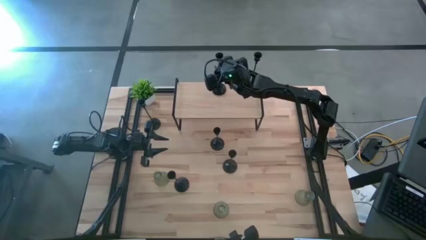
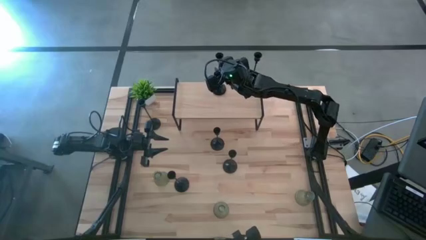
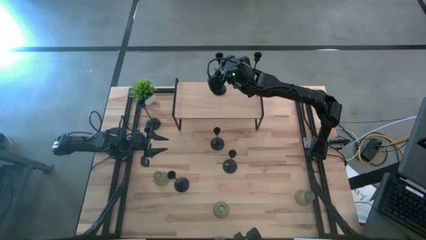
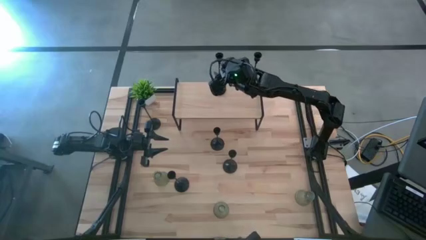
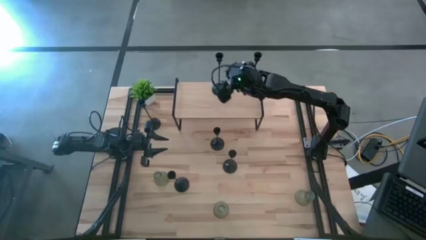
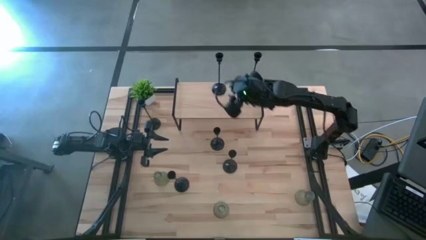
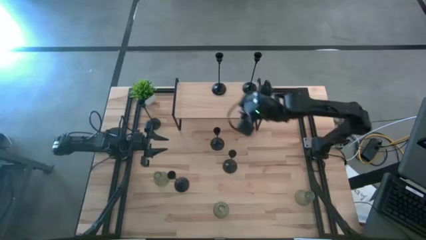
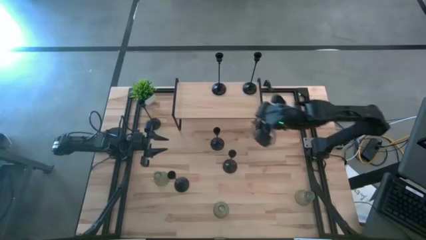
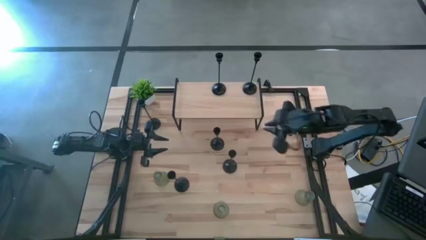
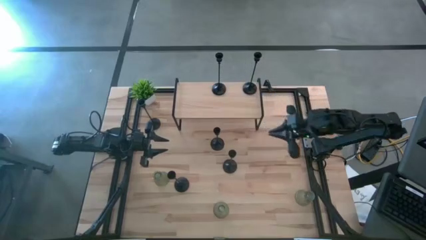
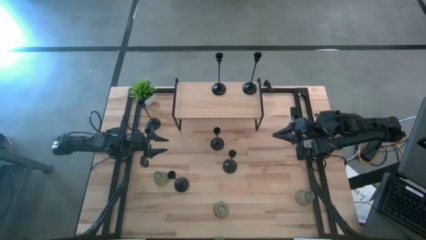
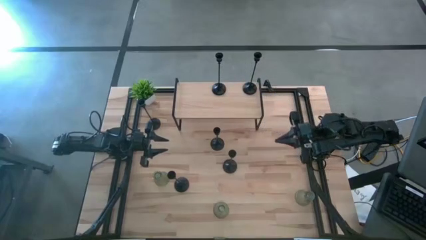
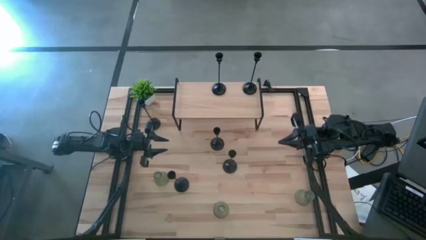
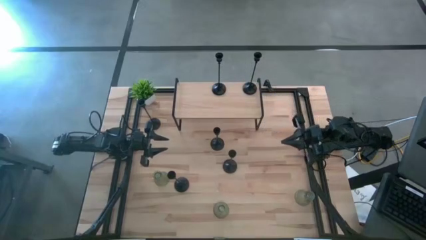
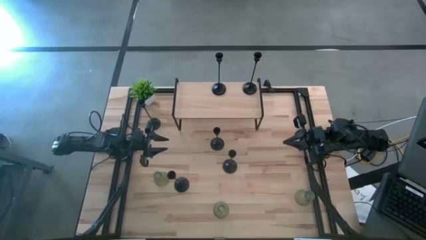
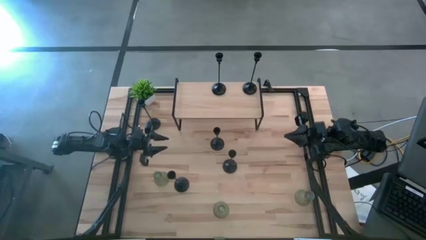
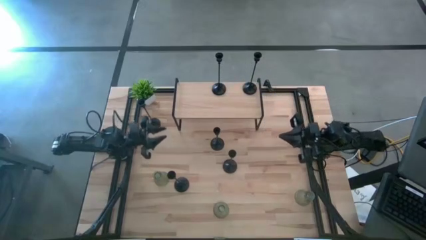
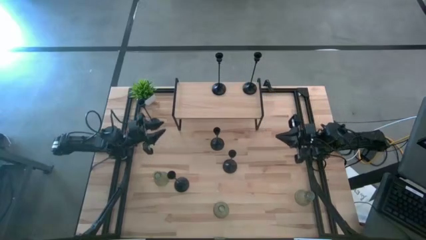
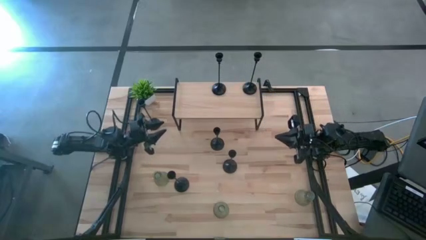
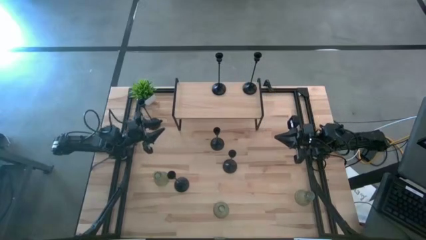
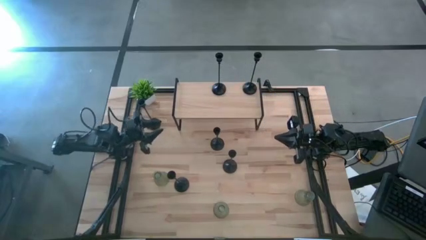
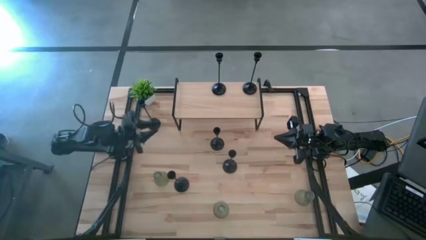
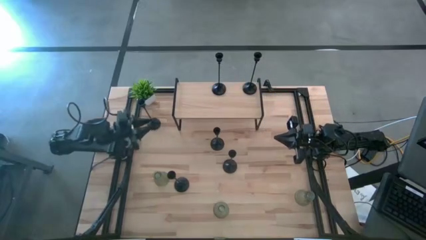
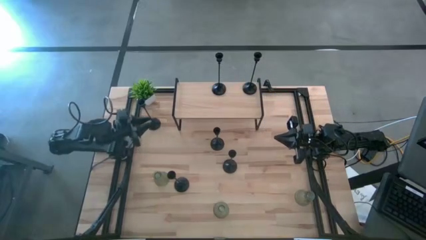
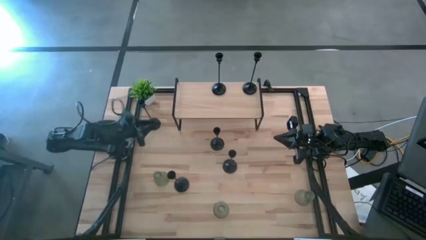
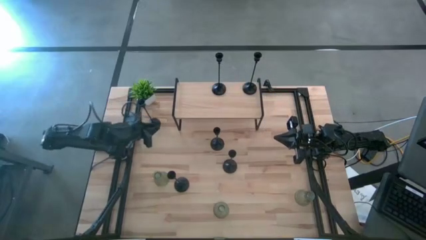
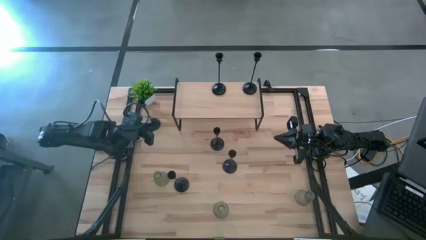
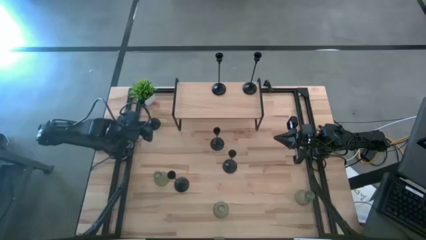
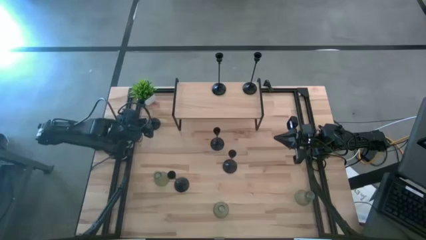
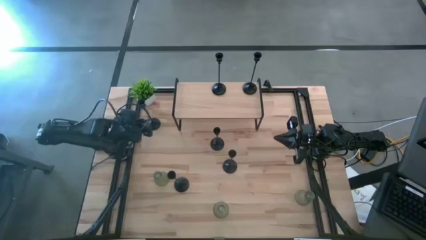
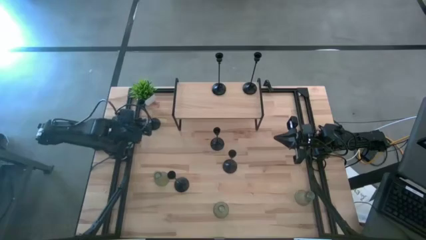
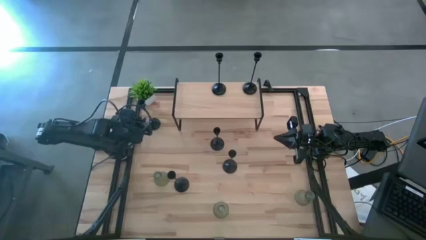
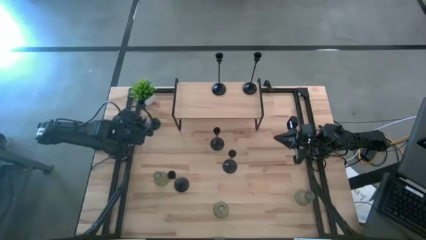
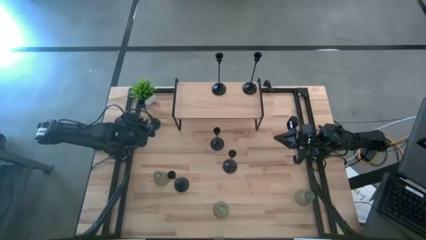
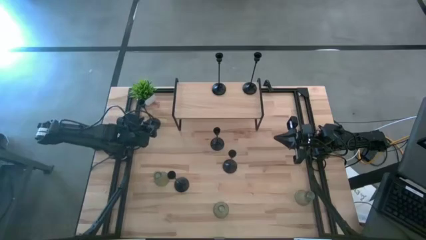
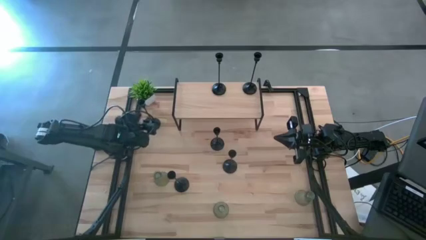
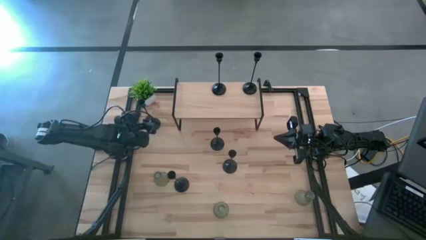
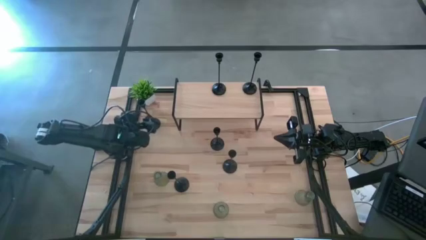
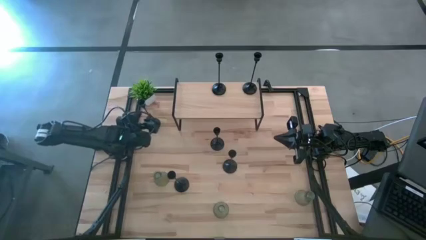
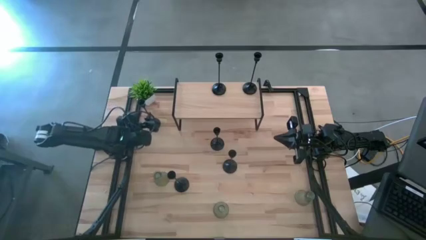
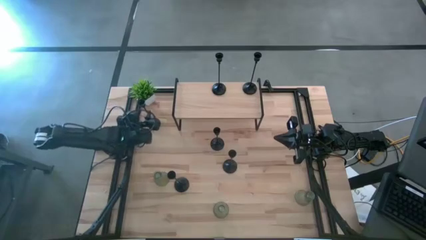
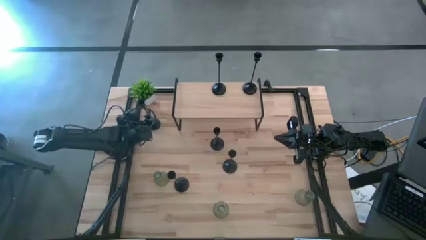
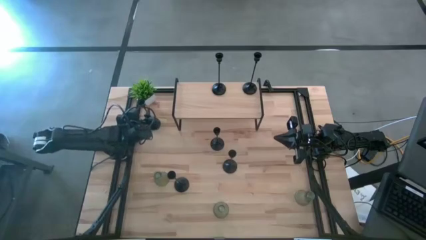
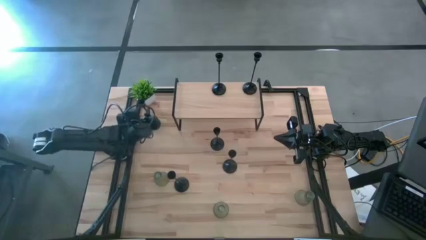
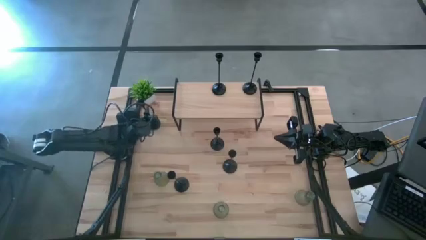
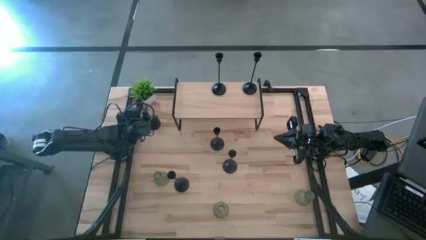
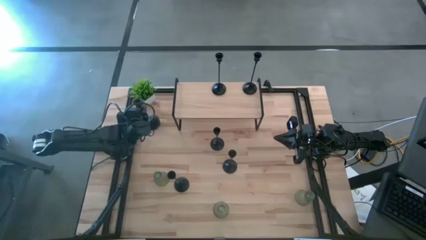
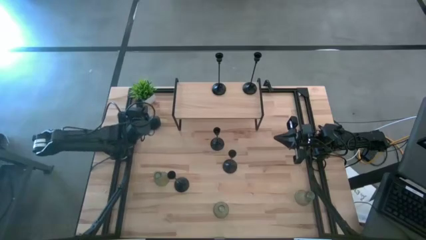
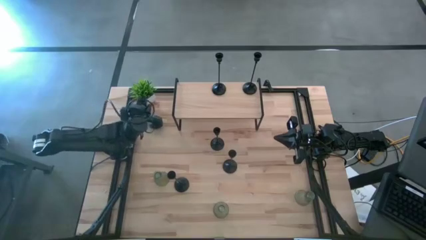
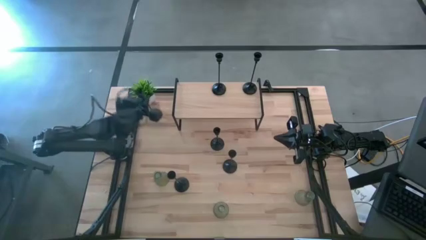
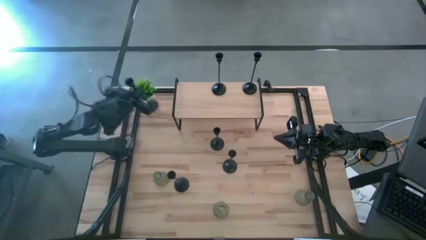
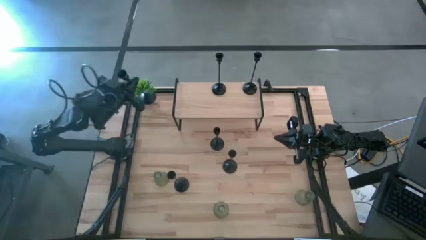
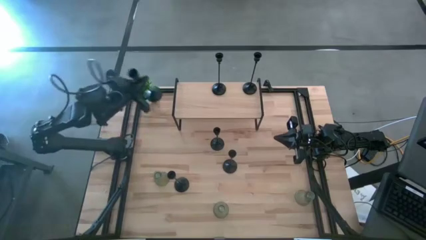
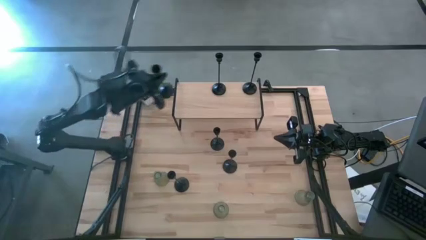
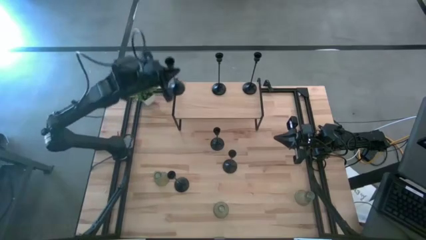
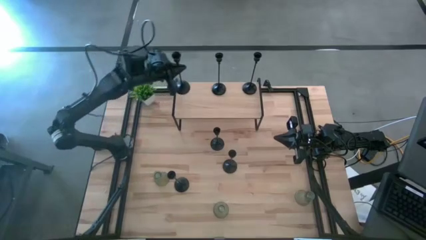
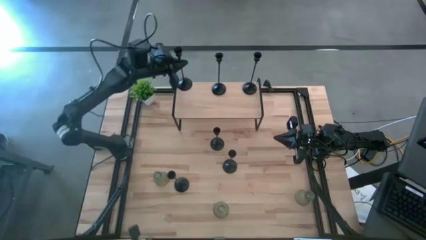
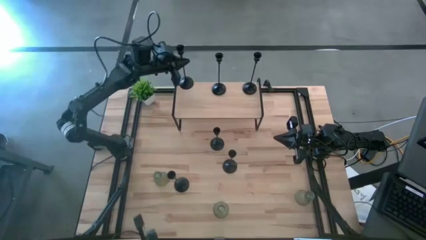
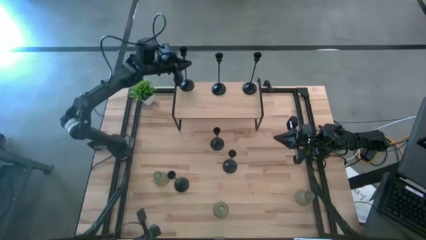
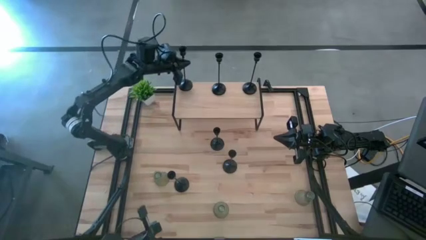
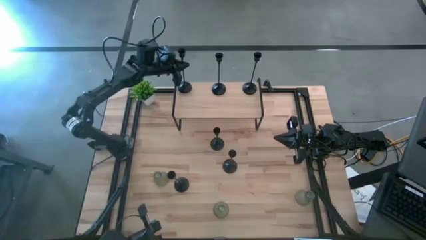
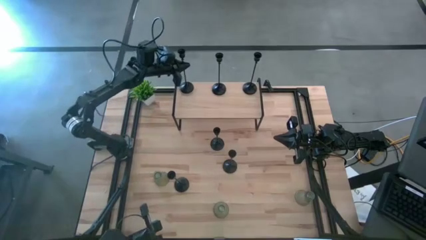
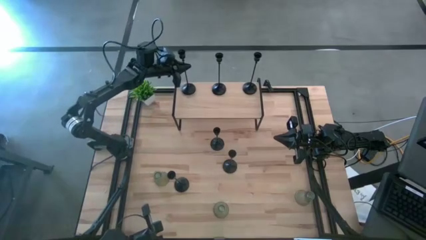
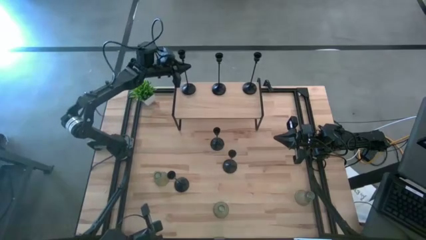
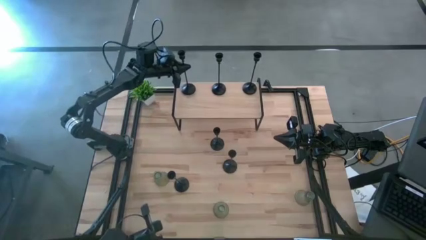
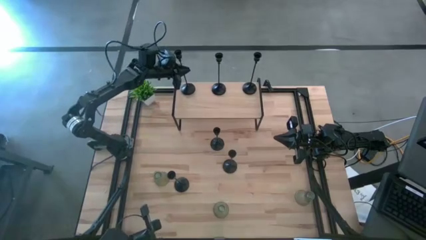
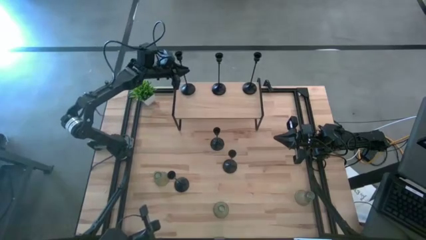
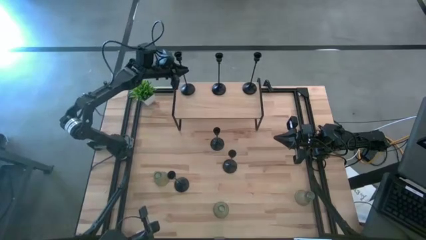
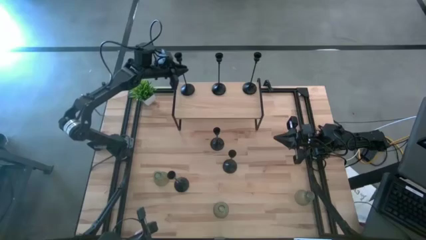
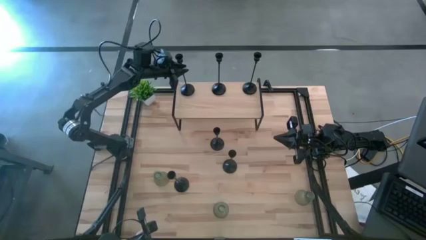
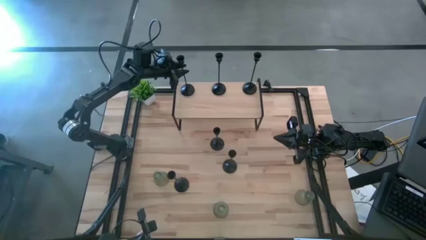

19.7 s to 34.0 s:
Task: Pick & Place candle stick holders
Put the black candle holder on the shelf

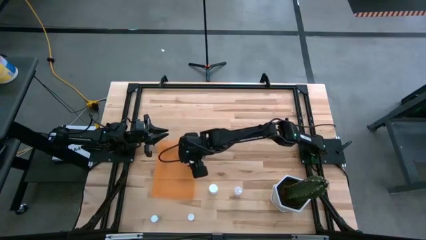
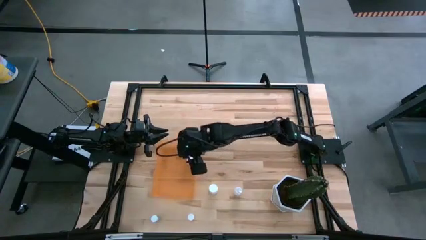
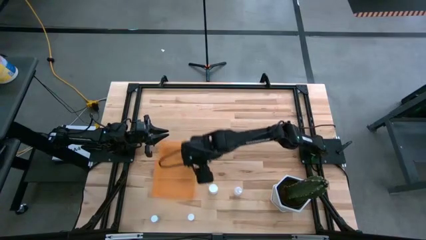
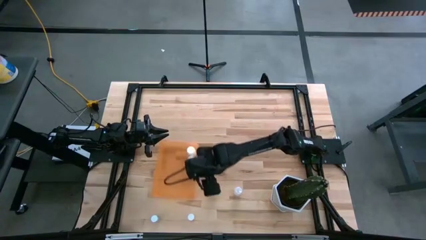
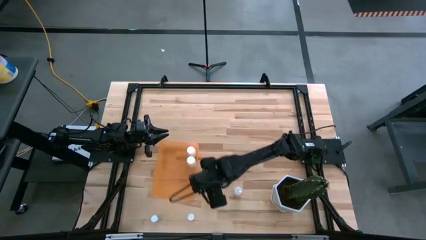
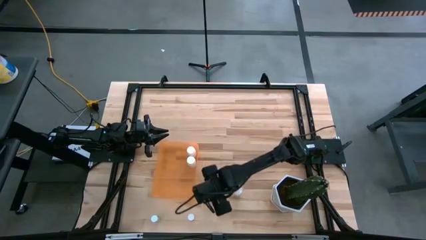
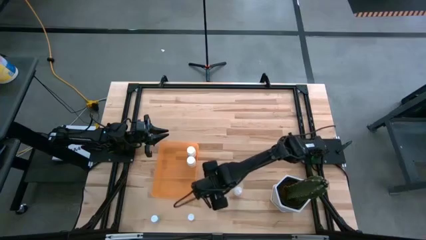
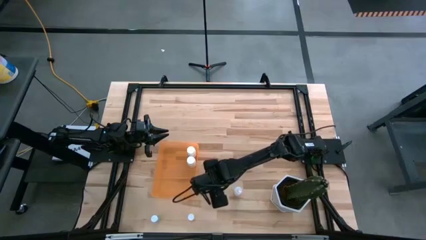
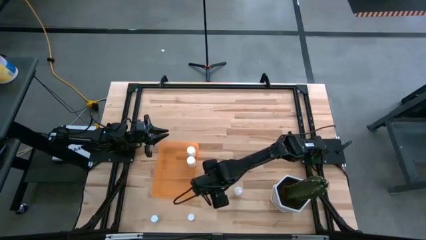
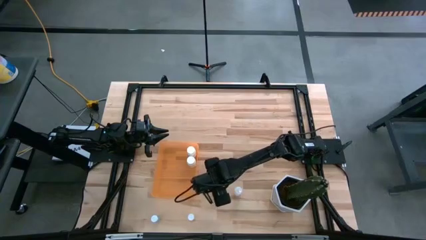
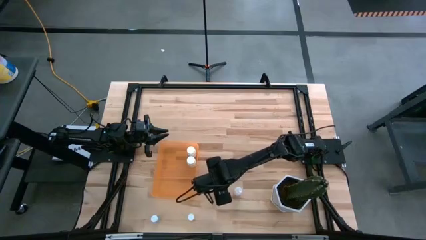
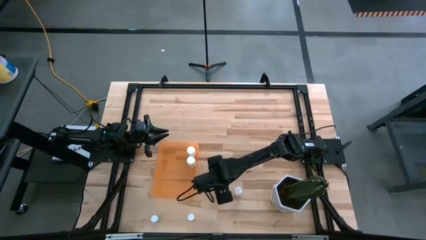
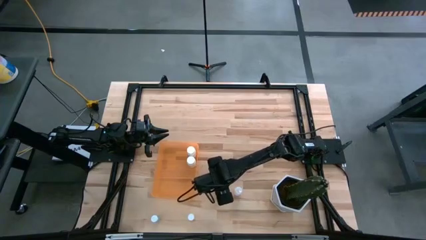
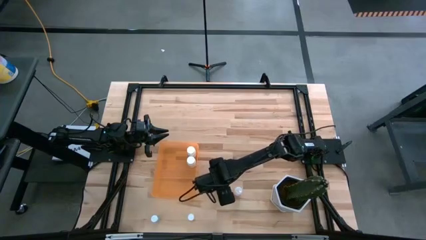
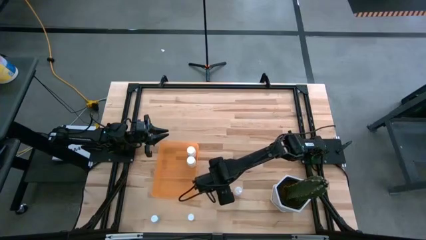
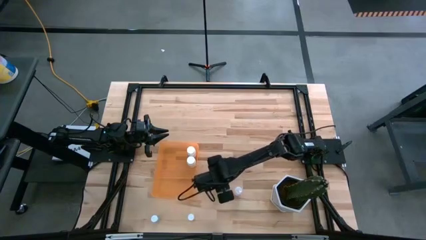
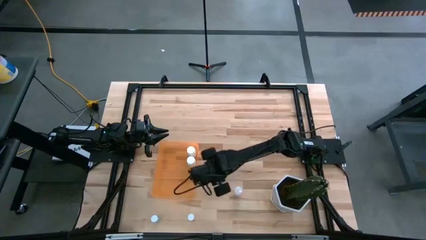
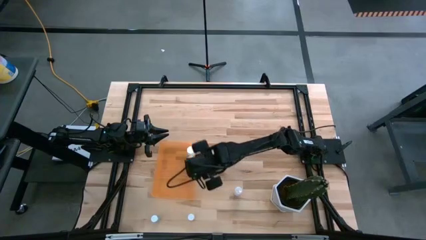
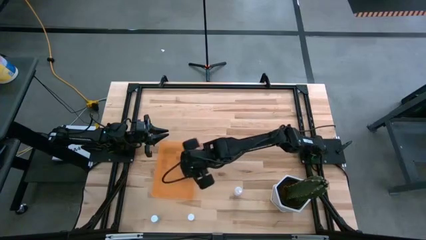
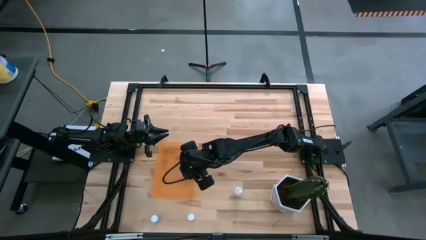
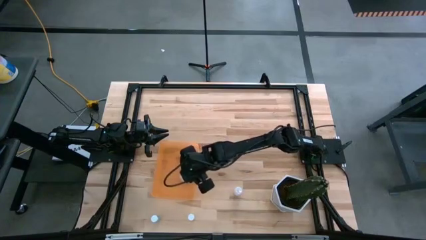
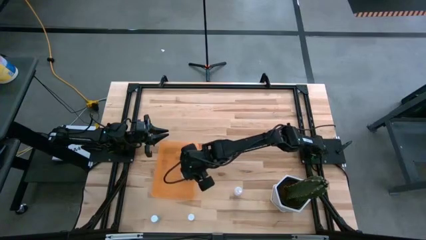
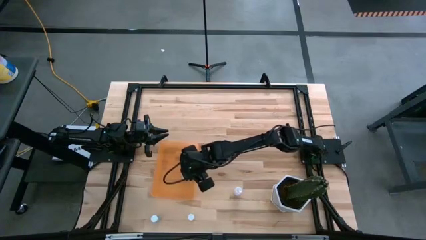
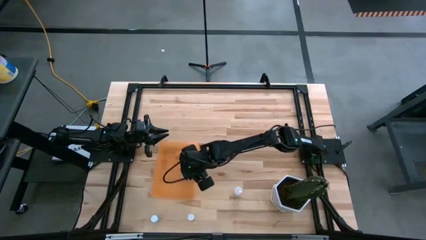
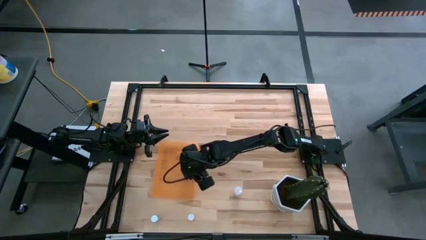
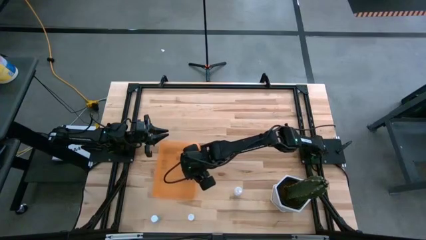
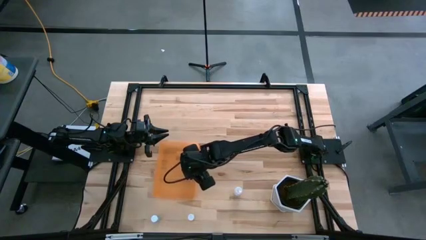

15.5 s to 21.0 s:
Task: Pick and place pill bottles into a basket
Put the white pill bottle into the orange bin
